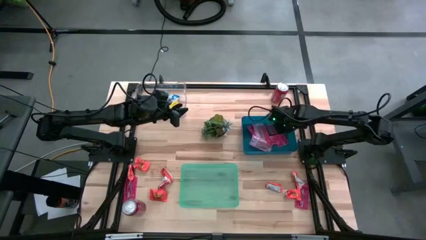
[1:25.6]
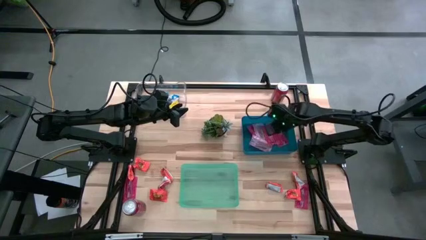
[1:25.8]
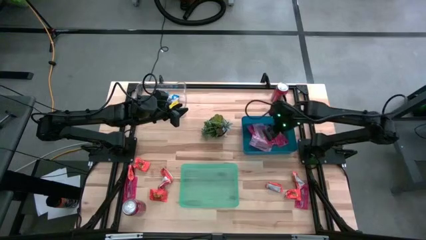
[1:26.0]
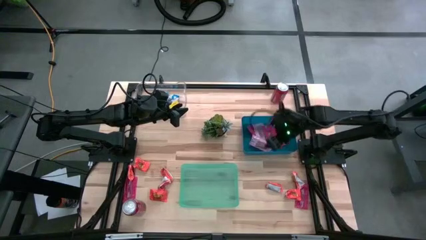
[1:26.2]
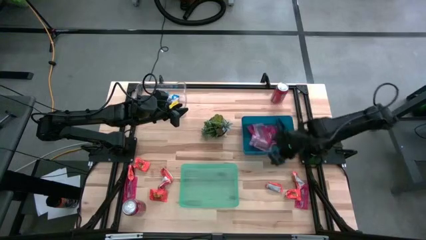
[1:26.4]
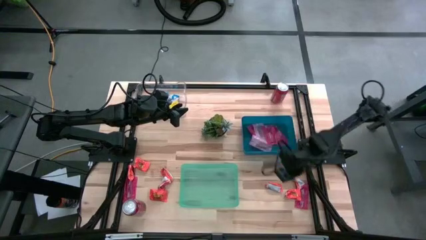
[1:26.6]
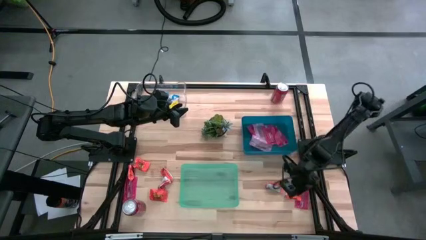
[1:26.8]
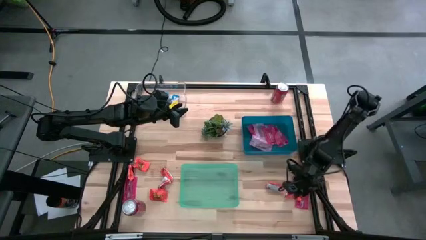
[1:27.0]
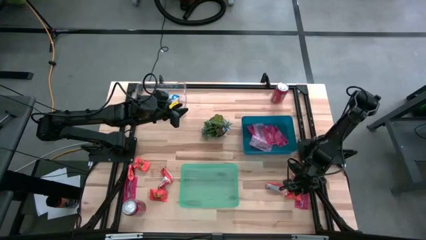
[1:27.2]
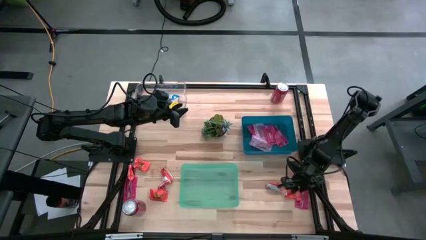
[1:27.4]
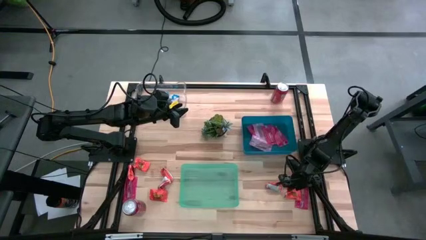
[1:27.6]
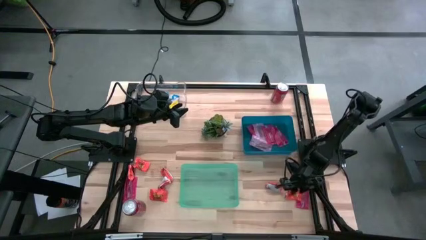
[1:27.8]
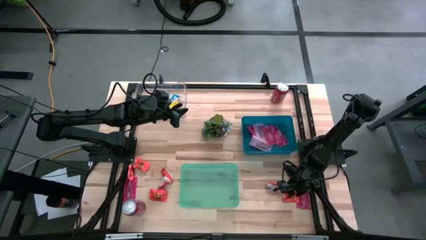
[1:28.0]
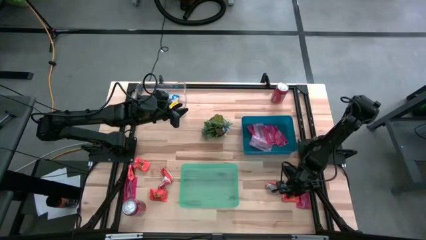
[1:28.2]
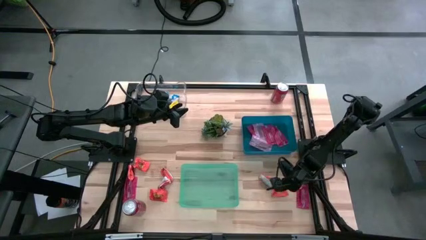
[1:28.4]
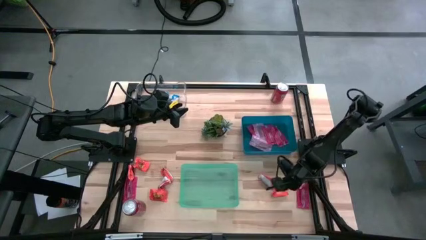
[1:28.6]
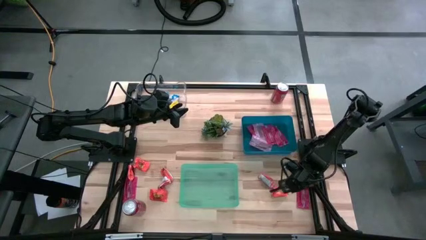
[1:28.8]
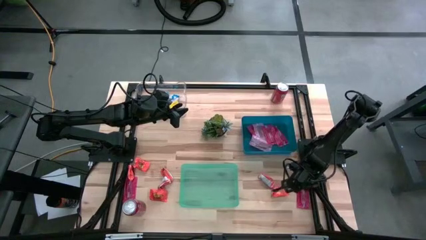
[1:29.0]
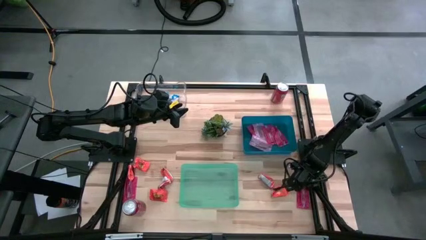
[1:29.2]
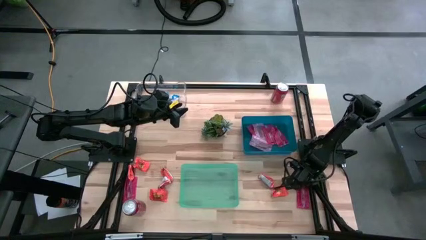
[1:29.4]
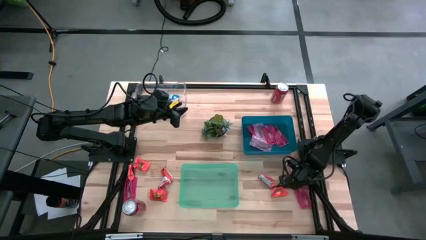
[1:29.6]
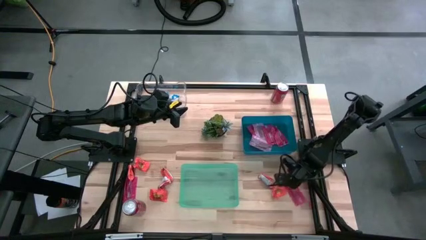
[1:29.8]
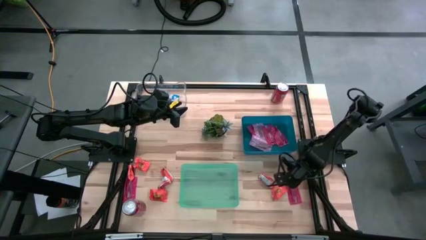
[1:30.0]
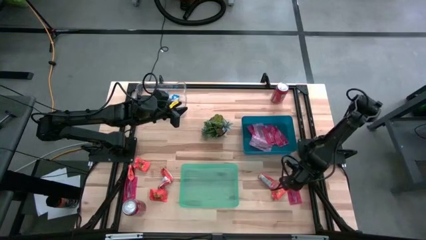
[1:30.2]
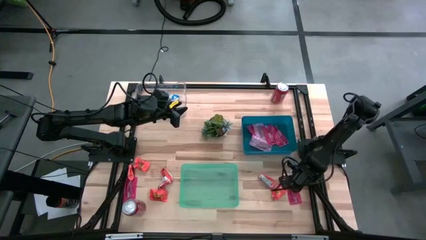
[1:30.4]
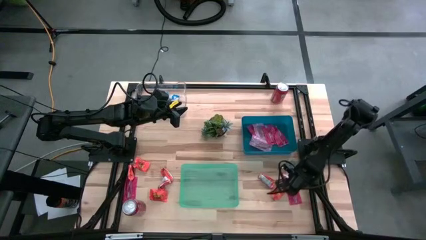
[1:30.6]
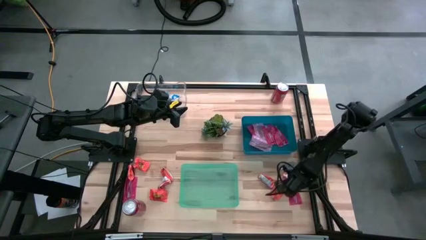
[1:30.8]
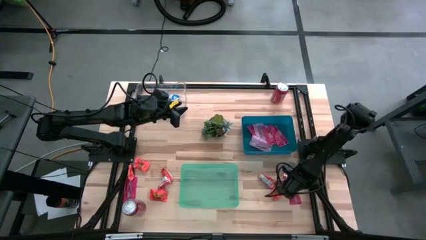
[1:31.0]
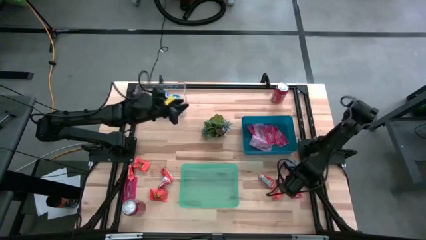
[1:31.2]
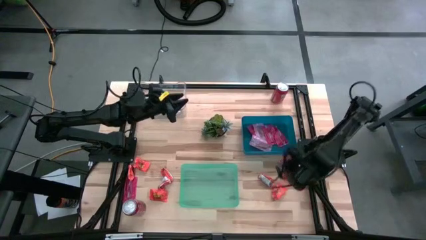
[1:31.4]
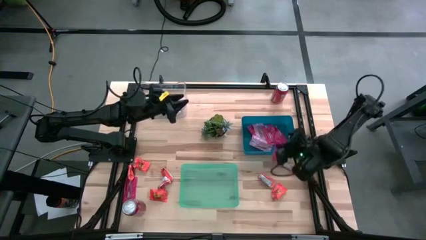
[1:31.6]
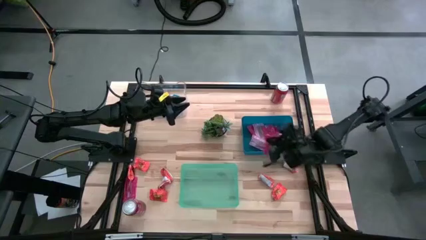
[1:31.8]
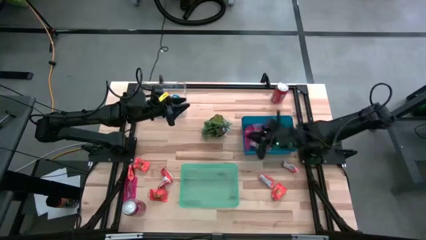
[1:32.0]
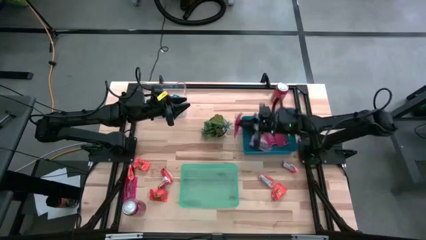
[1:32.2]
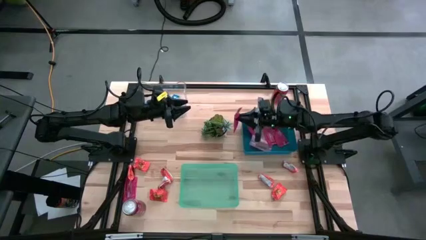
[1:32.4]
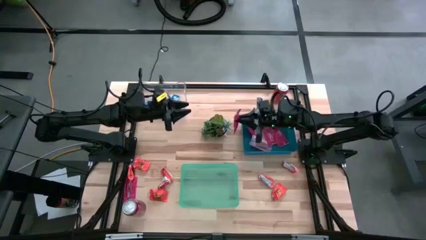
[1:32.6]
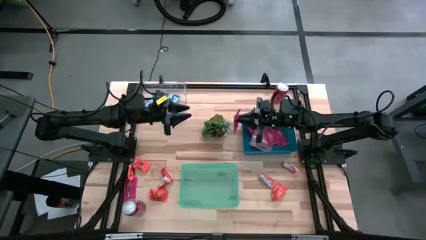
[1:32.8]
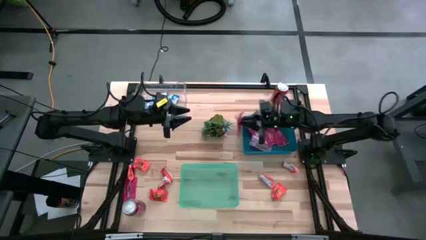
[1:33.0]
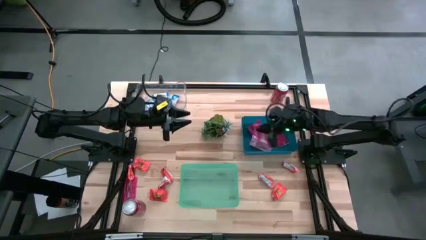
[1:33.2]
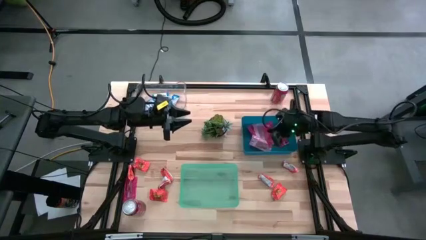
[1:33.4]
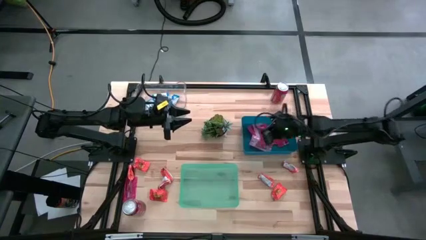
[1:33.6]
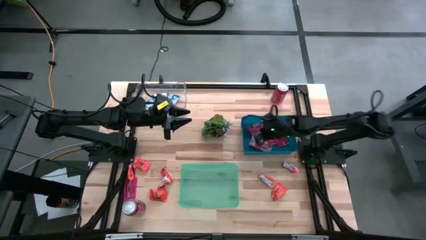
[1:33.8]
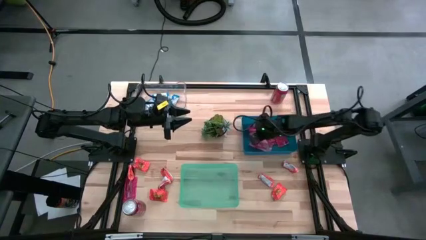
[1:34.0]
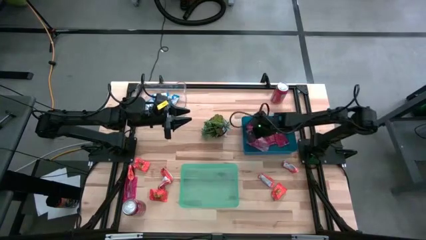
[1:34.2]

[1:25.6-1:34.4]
Task: Sort candy
Put the red candy into the blue bin

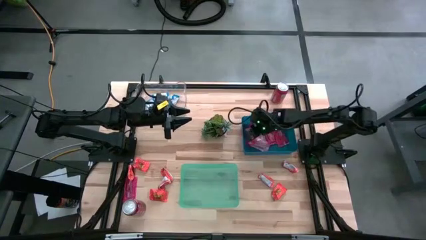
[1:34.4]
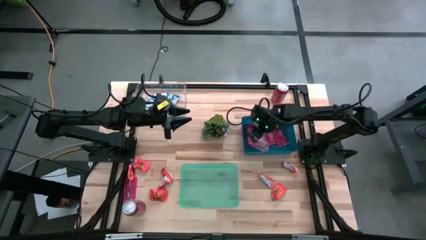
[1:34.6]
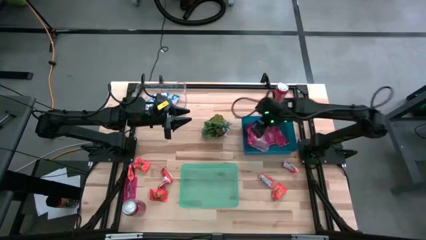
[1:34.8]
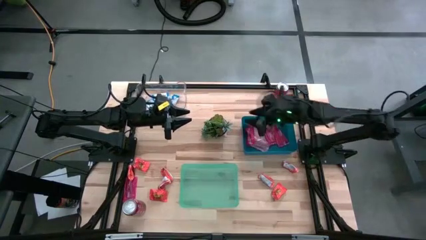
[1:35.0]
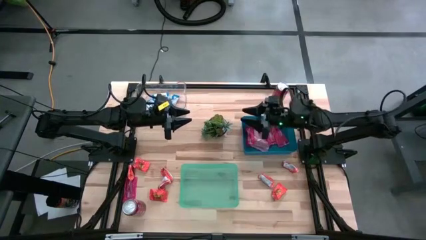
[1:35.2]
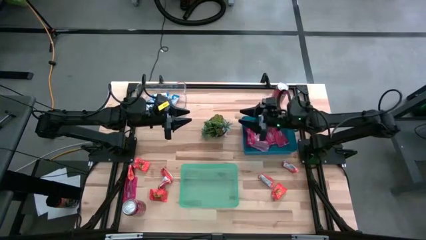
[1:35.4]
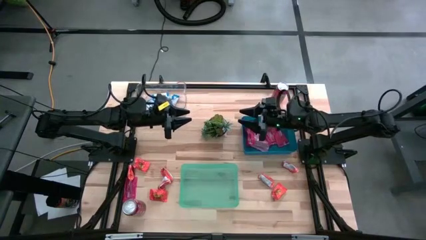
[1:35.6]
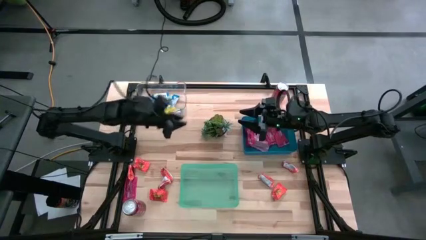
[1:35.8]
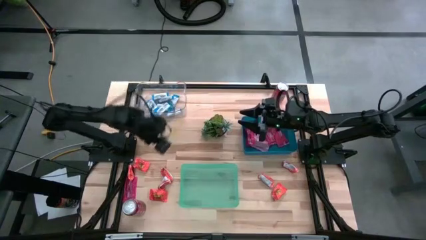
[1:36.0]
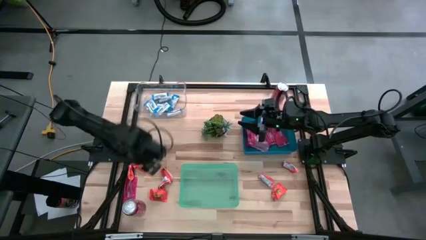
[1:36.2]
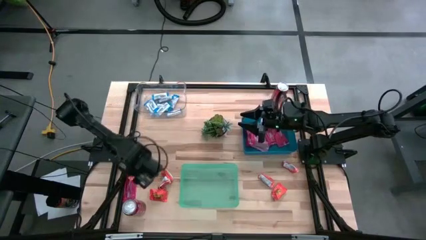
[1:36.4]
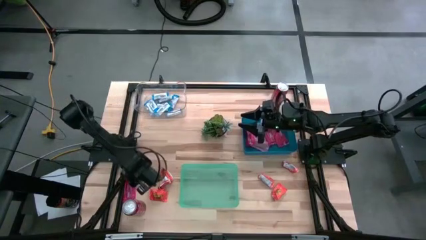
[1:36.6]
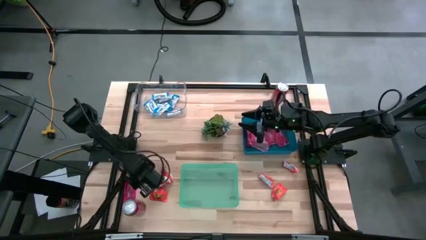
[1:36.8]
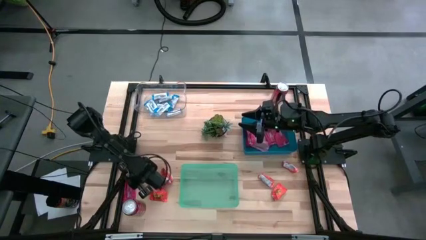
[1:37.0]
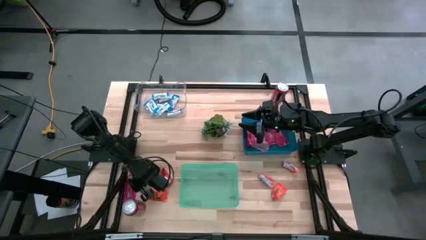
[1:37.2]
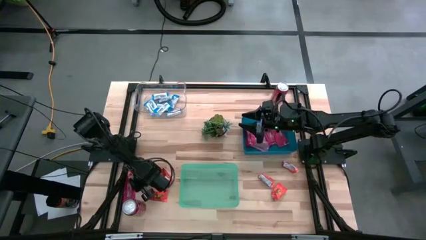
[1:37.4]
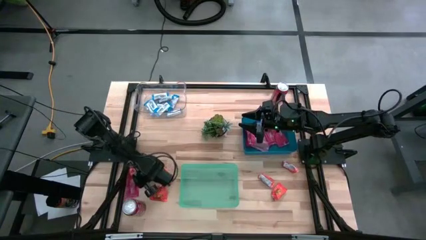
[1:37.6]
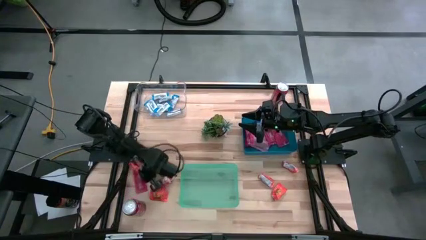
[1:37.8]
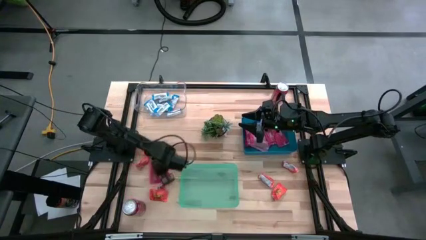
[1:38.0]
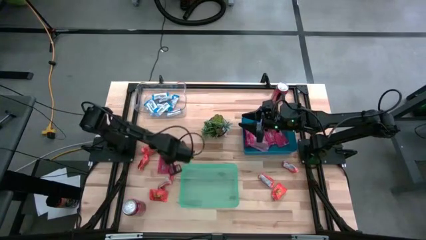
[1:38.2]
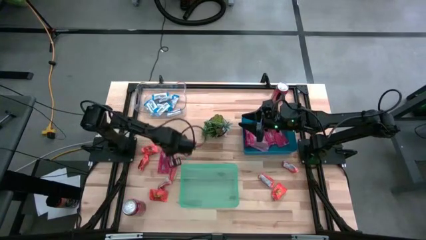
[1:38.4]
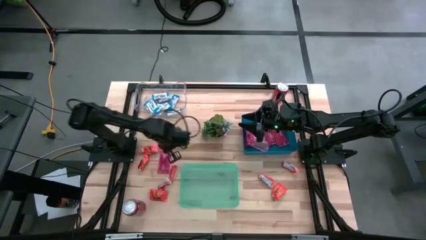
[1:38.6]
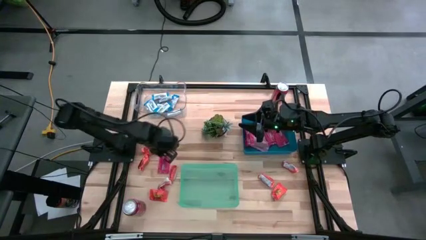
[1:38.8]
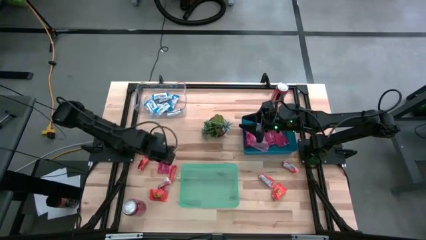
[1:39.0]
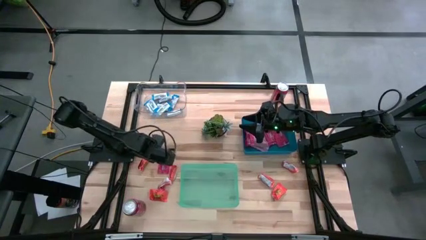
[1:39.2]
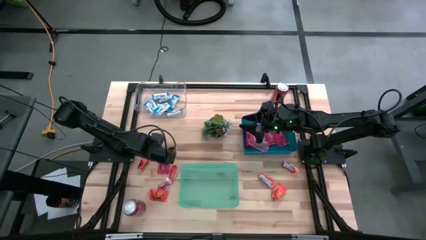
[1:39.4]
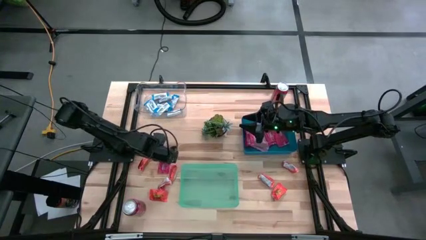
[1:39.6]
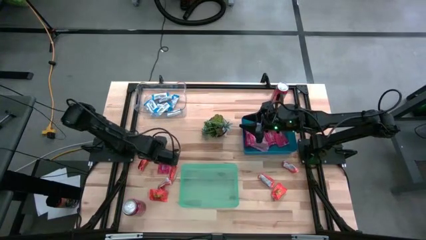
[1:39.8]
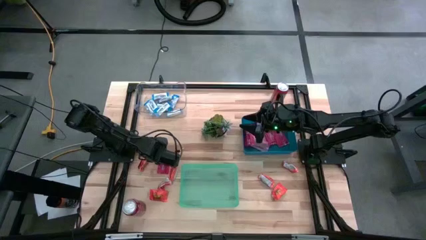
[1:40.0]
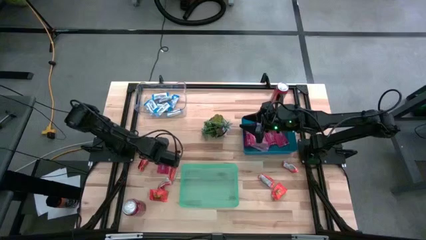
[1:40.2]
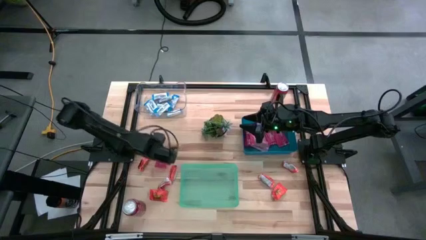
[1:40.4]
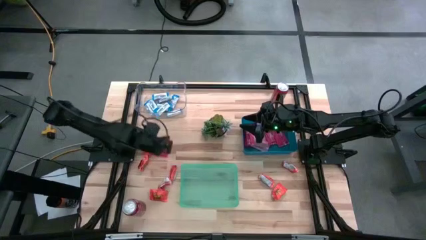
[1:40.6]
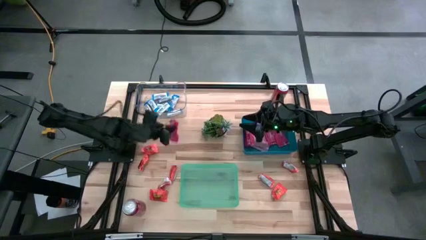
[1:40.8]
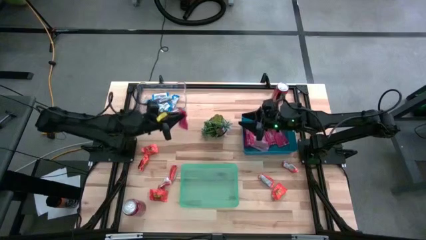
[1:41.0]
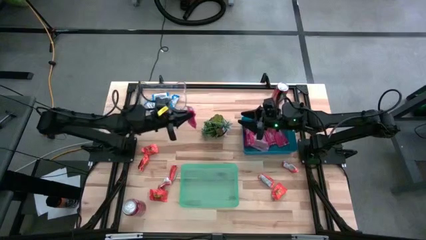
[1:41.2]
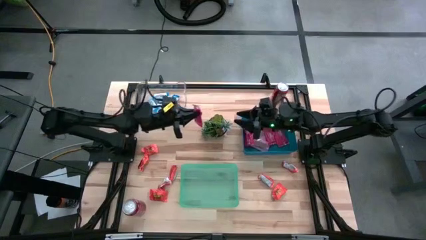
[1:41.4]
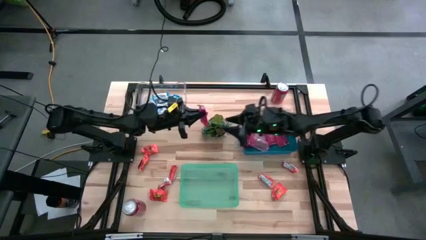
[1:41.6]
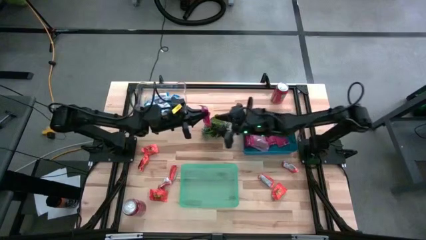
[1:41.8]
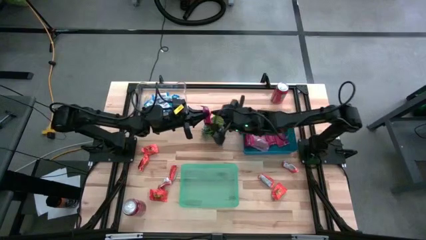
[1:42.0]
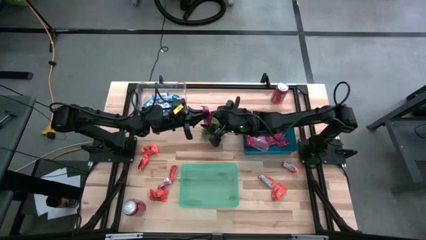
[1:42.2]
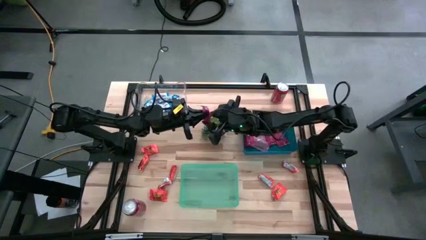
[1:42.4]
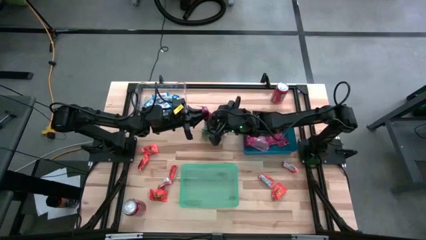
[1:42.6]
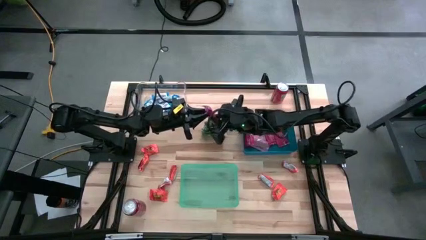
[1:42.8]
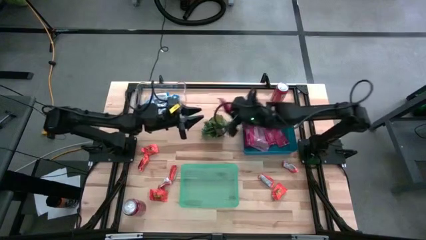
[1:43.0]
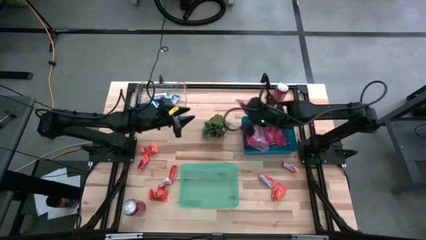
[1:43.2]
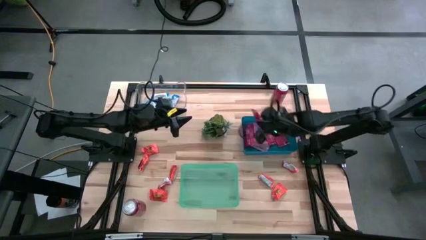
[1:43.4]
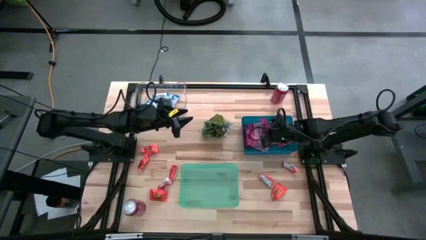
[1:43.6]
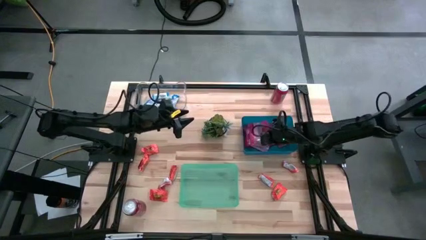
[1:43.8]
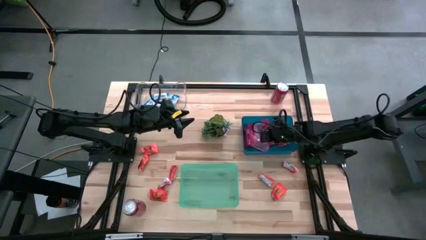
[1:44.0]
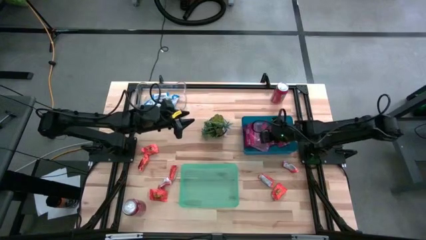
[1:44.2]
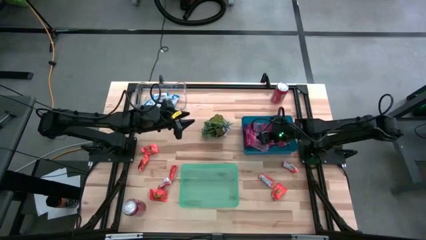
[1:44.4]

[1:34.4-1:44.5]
Put the red candy into the blue bin
